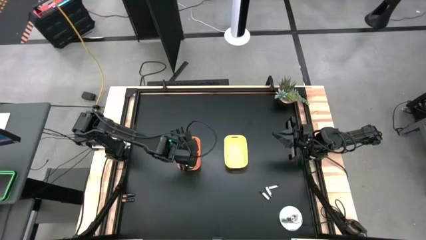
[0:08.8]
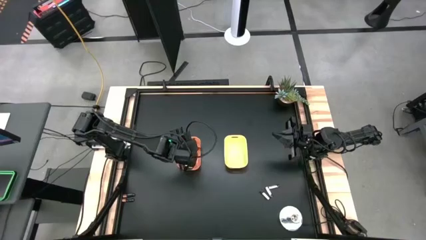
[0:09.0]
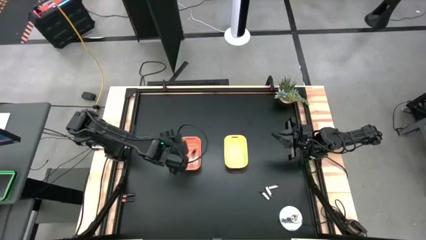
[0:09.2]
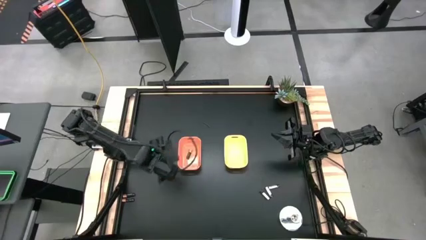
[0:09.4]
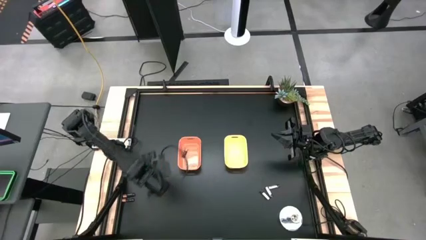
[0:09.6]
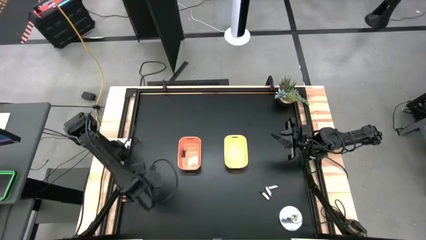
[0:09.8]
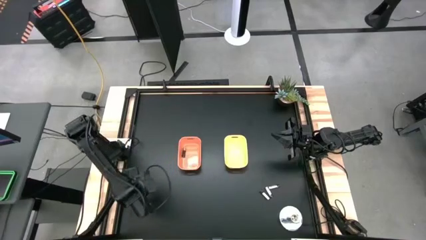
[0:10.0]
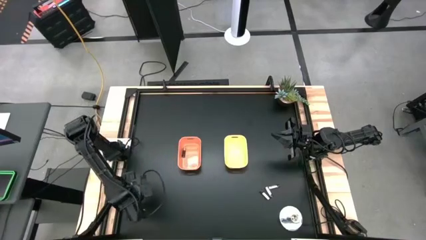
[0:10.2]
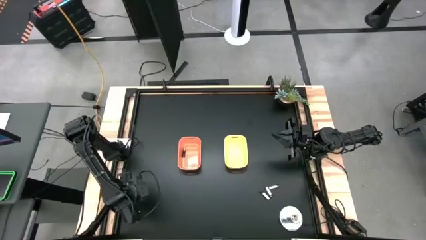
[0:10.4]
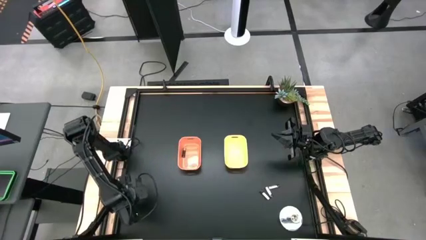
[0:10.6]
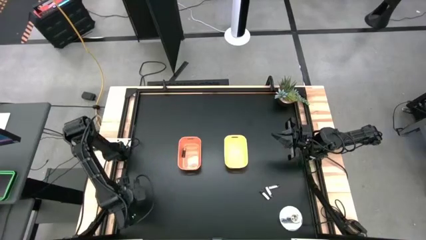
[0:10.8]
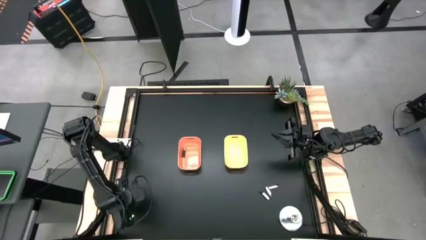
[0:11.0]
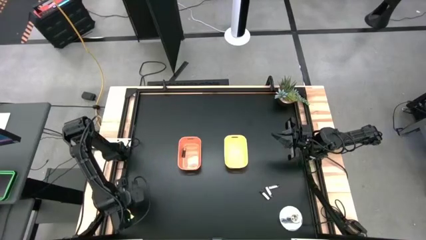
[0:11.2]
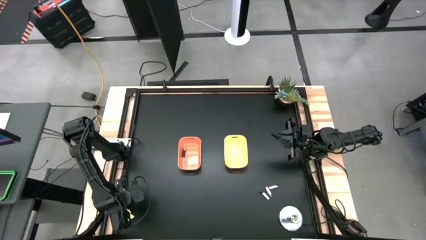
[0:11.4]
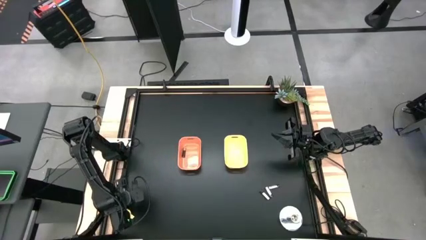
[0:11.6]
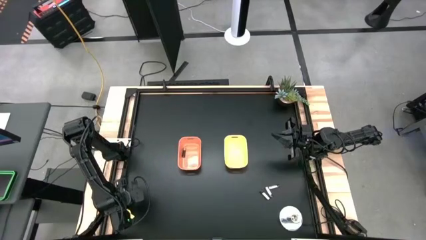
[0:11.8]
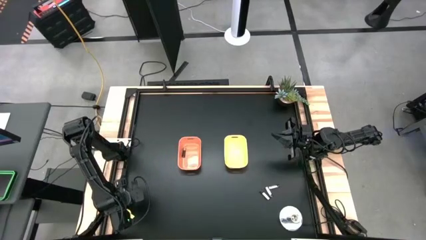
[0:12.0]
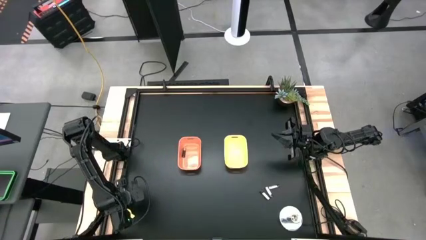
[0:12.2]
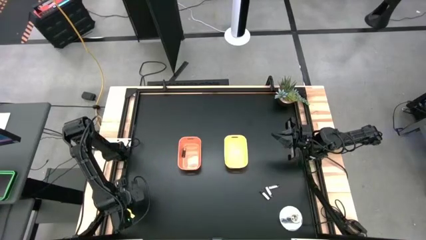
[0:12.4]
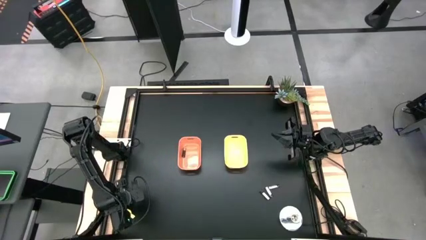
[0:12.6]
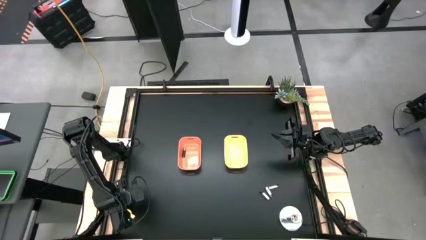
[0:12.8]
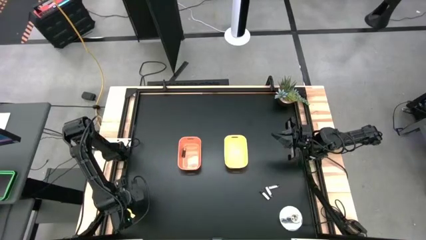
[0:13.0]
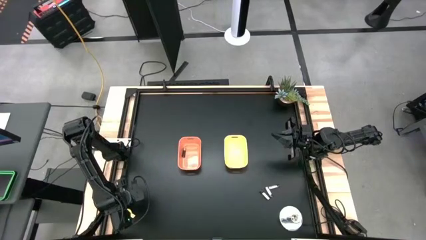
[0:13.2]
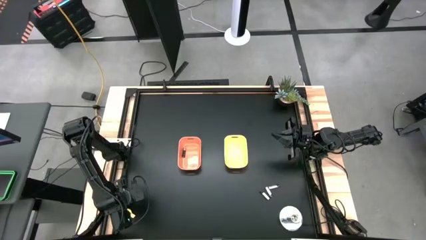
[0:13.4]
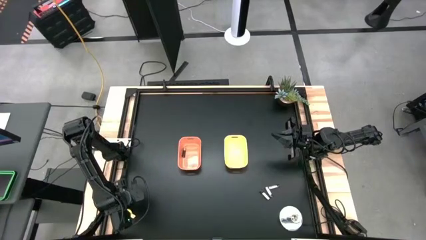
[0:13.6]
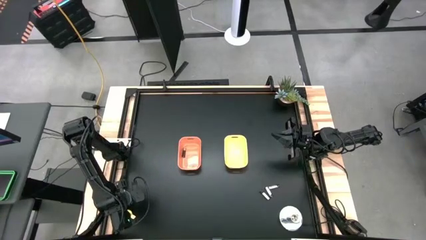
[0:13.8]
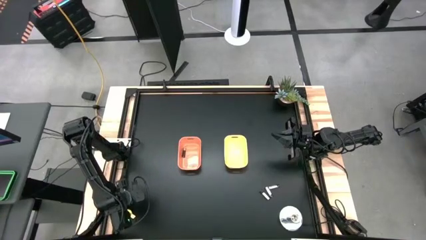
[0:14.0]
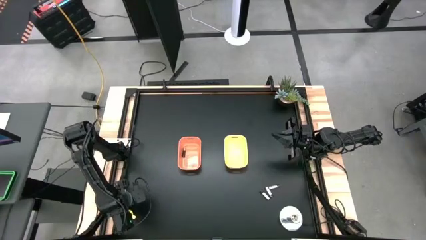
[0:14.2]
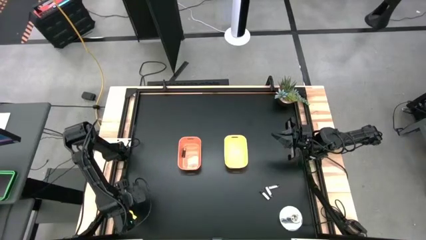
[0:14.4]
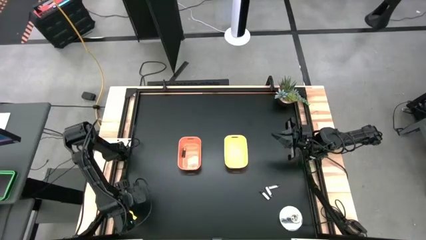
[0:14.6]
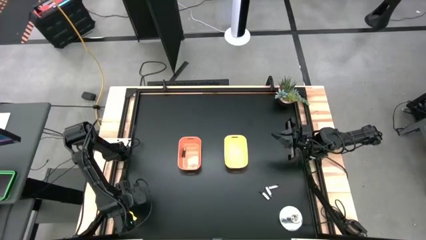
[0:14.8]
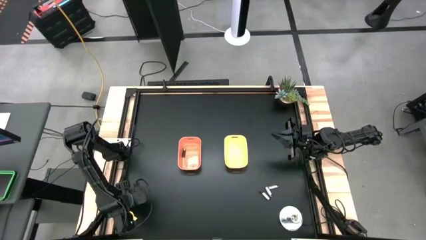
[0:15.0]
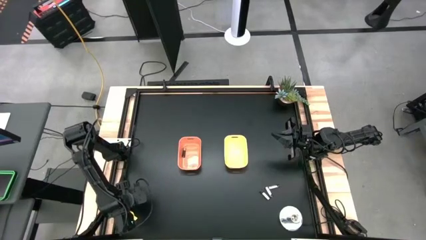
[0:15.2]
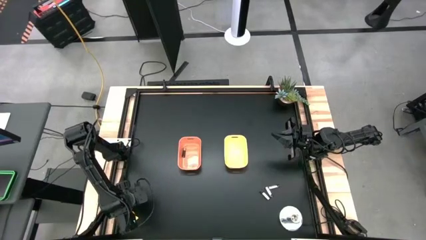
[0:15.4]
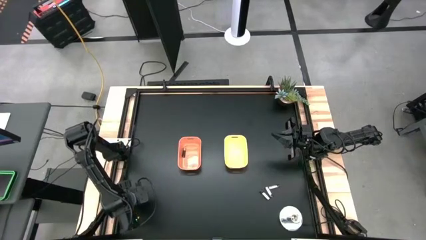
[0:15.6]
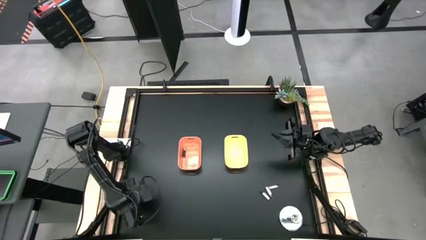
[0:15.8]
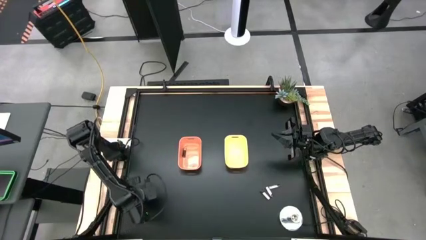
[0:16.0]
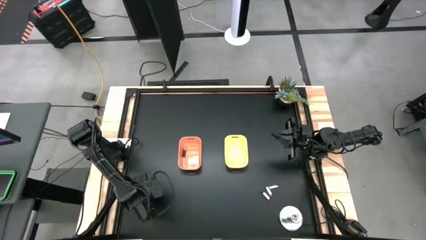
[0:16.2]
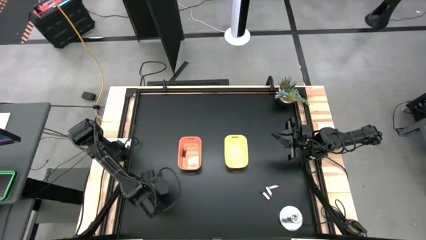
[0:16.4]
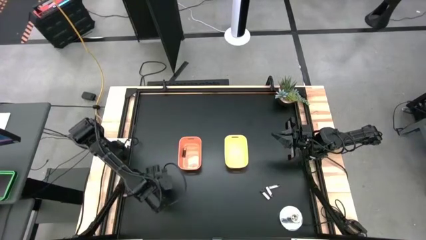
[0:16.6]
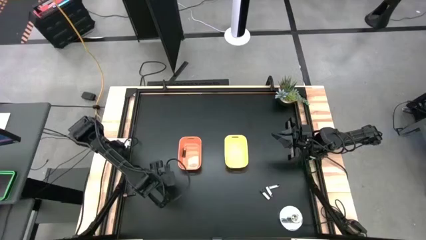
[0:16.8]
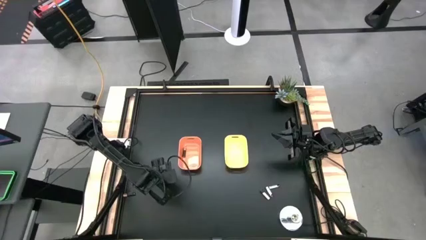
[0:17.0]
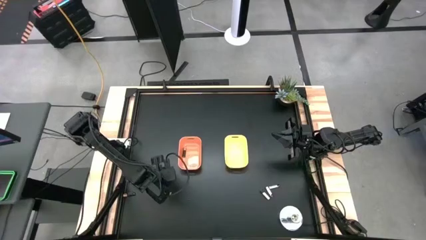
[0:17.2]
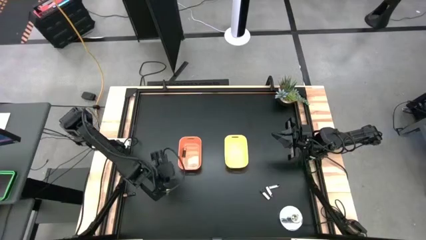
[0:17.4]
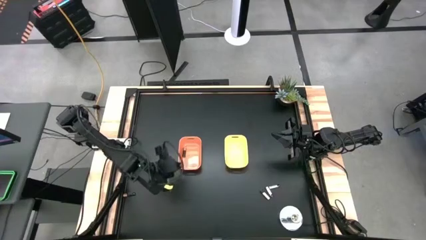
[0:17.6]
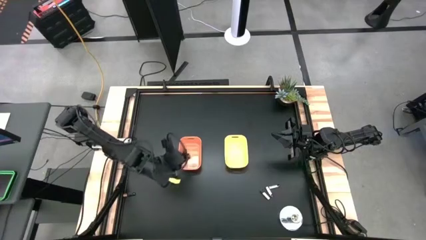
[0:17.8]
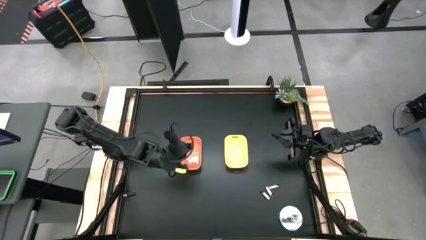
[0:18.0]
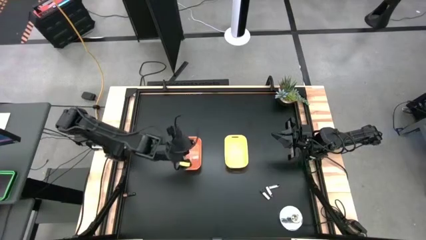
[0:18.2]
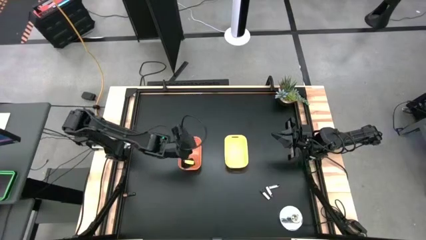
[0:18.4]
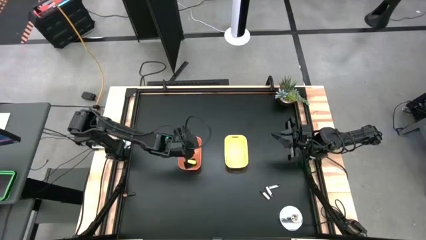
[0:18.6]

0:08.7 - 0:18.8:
Task: Sort batteries
Put the bottom black battery into the orange bin

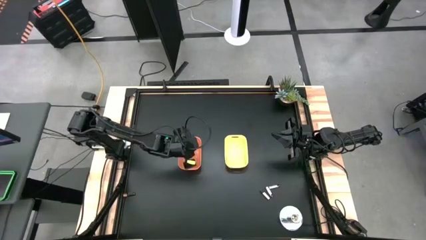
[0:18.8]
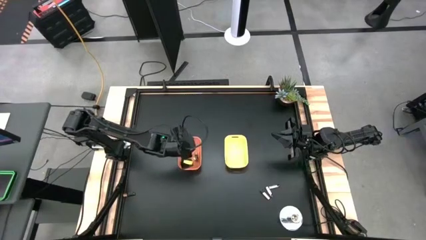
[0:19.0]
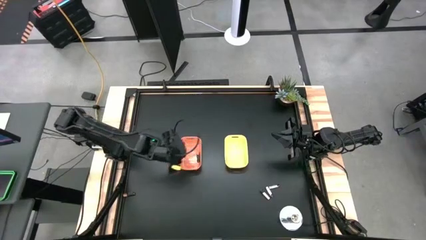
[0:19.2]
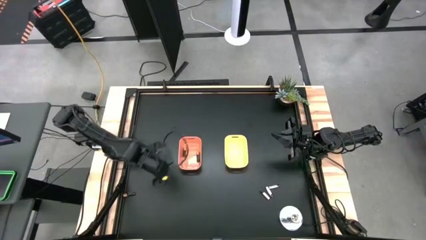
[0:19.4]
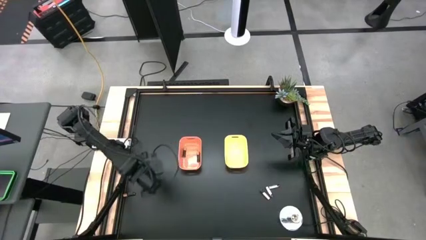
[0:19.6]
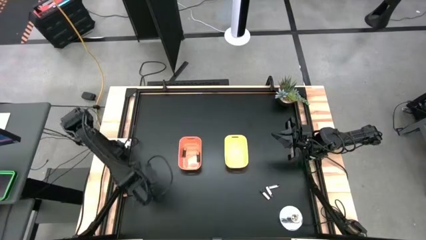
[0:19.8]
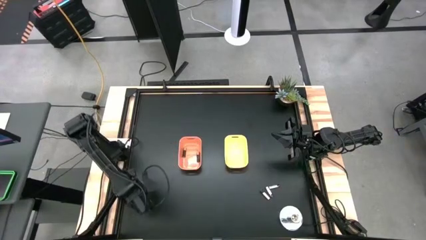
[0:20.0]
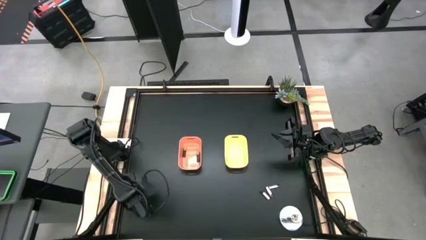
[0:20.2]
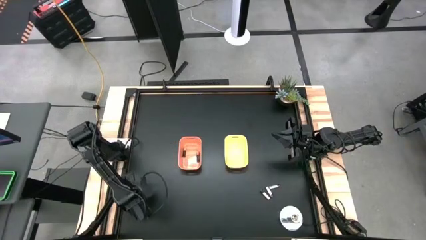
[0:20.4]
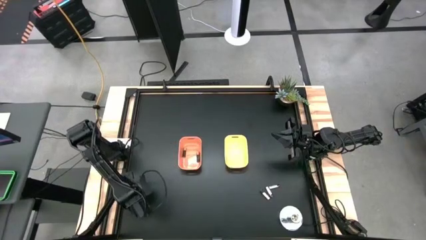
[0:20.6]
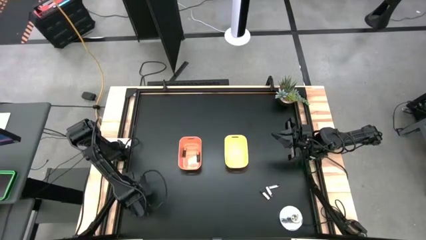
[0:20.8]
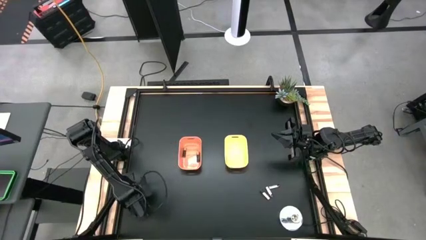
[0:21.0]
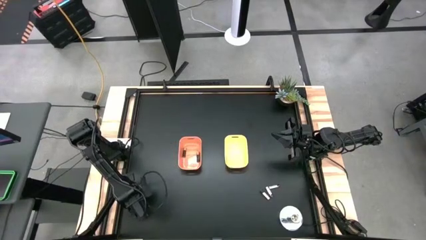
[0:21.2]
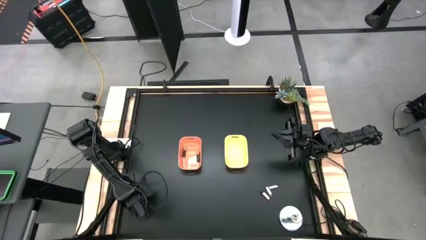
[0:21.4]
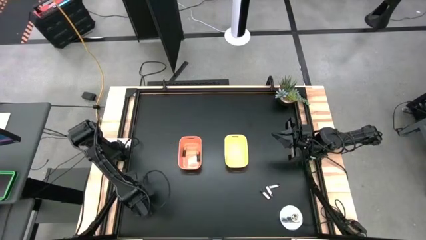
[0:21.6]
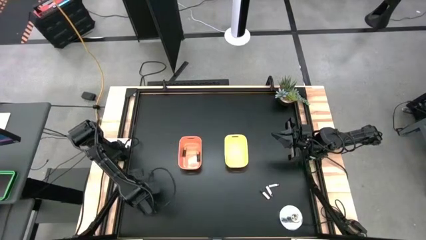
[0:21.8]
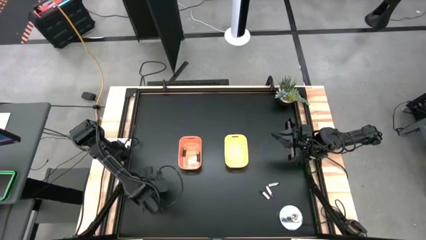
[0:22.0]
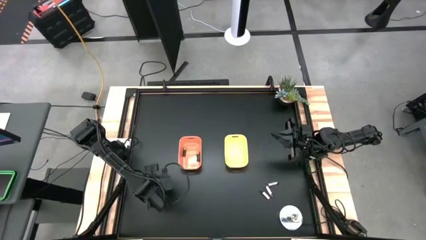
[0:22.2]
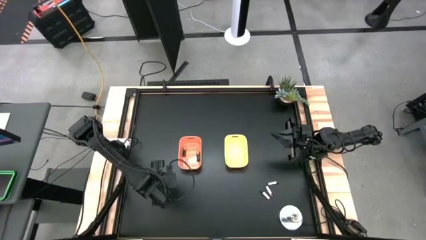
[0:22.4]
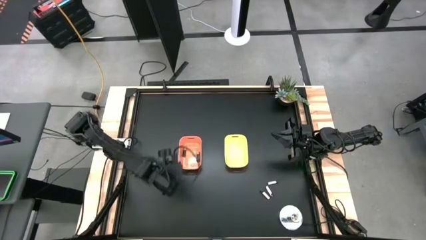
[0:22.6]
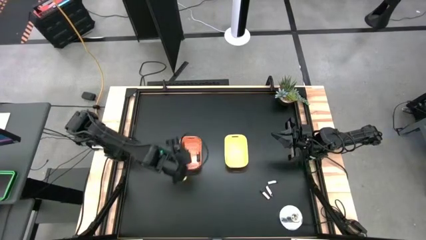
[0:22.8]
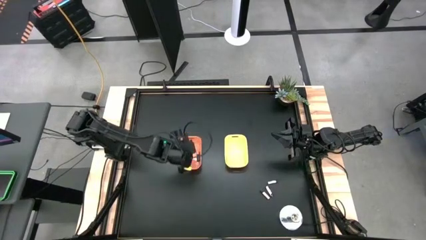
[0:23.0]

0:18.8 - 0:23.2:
Put the black battery into the orange bin

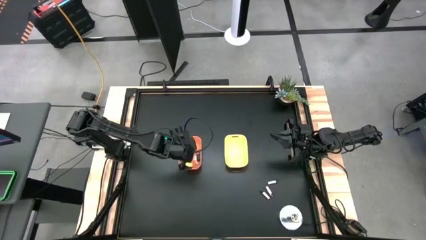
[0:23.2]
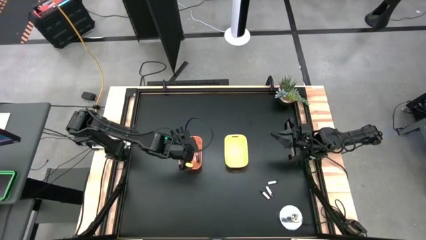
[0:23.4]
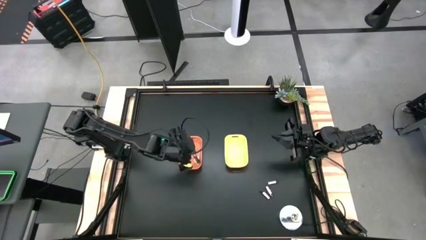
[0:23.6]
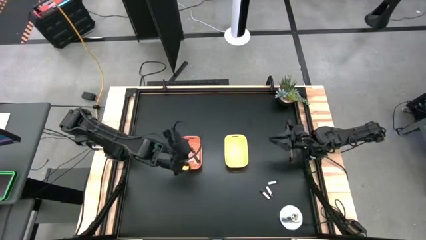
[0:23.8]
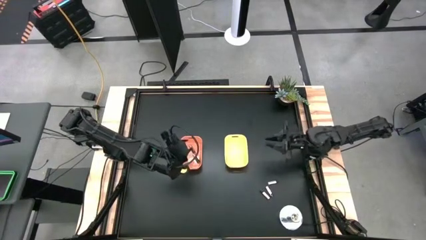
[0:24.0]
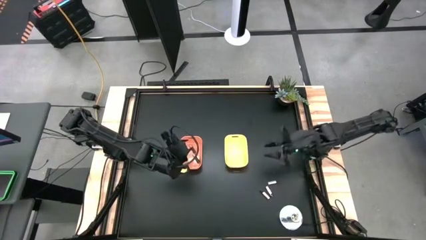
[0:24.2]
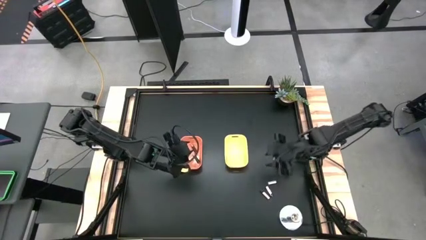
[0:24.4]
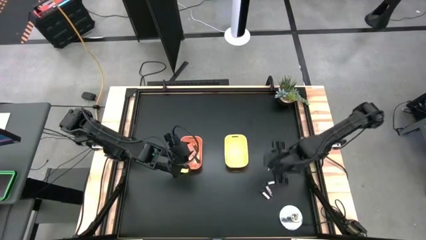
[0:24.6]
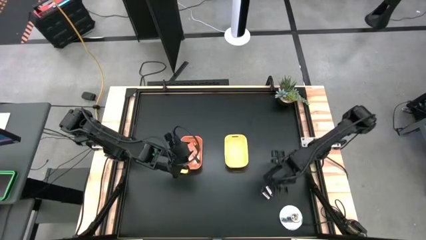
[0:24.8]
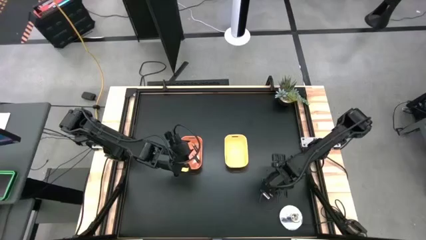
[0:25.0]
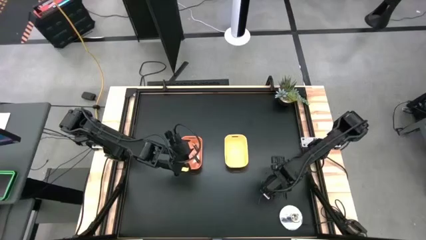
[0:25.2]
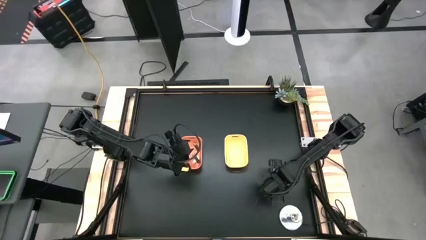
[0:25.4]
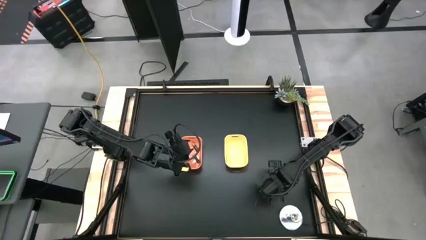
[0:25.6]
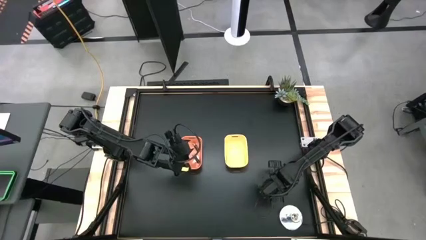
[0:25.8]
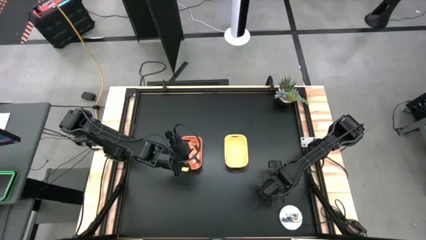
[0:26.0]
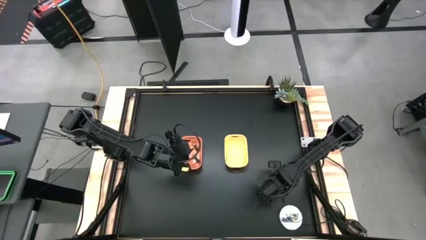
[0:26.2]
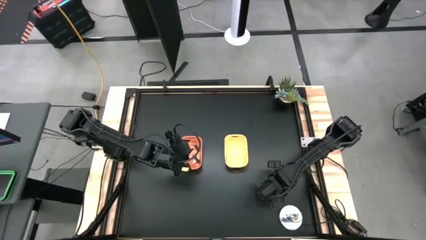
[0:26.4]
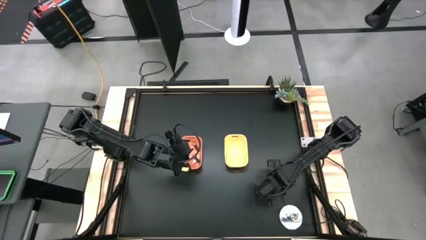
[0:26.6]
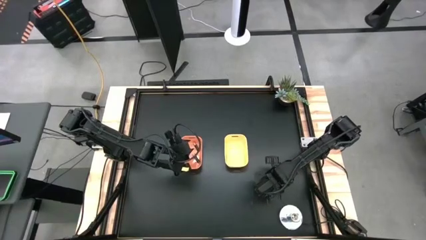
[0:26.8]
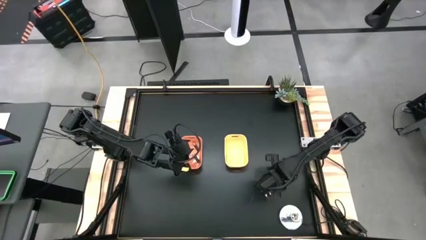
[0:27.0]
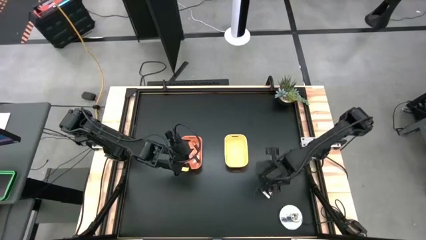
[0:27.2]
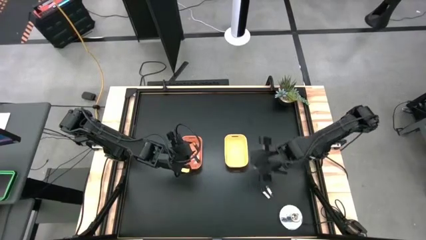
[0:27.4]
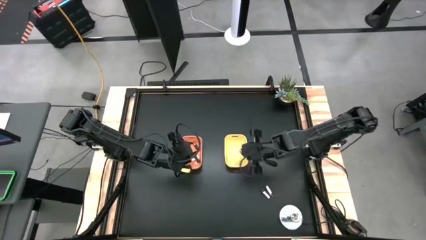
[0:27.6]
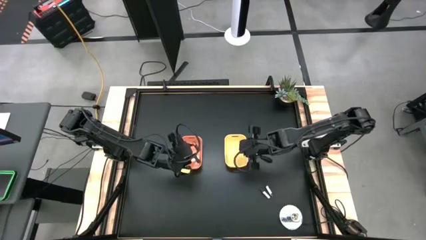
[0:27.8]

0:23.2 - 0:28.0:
Put the top silver battery into the yellow bin
